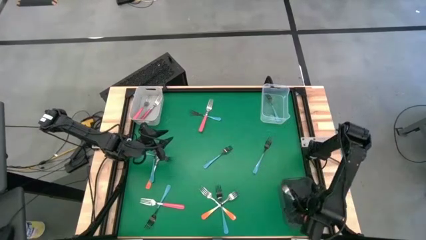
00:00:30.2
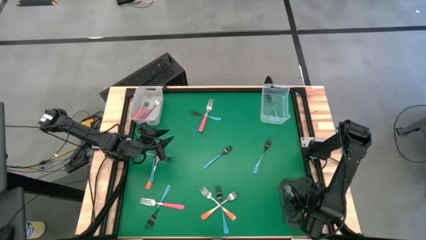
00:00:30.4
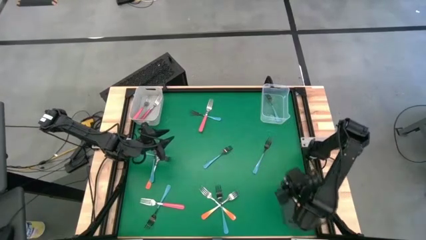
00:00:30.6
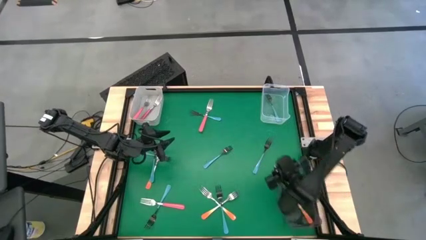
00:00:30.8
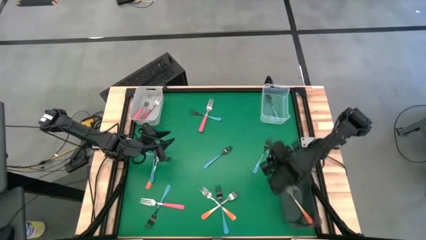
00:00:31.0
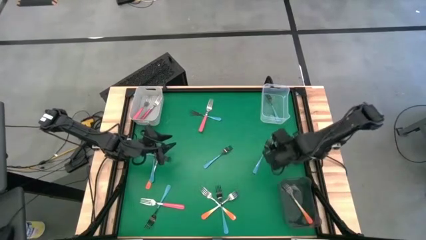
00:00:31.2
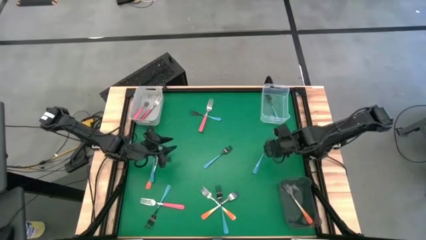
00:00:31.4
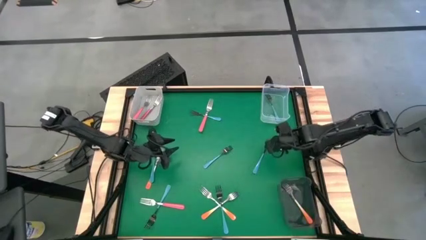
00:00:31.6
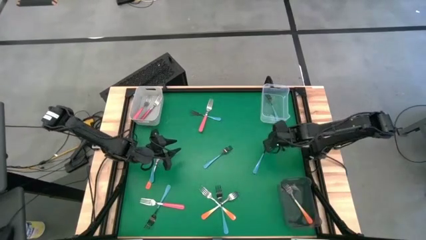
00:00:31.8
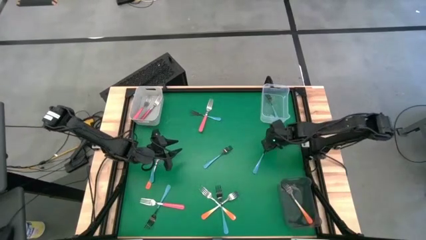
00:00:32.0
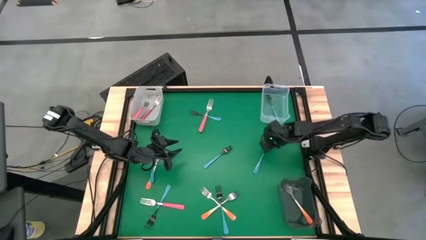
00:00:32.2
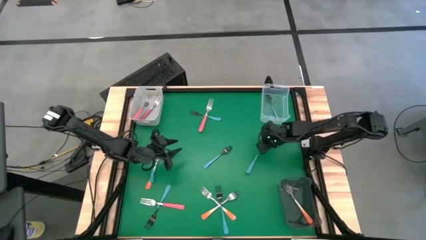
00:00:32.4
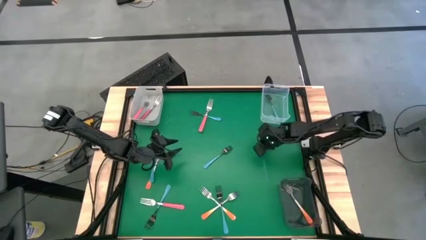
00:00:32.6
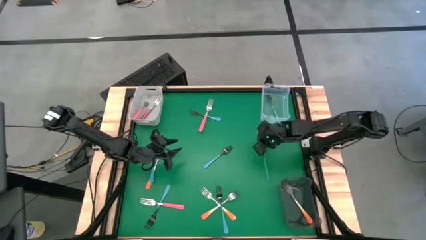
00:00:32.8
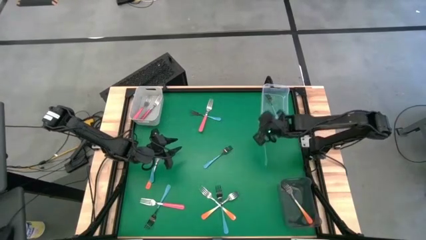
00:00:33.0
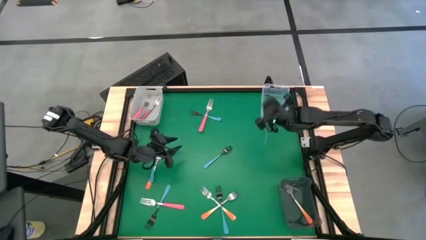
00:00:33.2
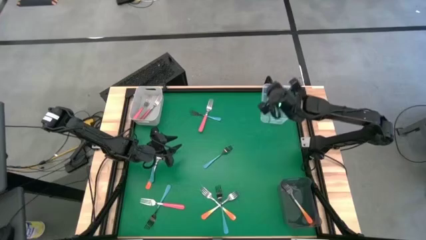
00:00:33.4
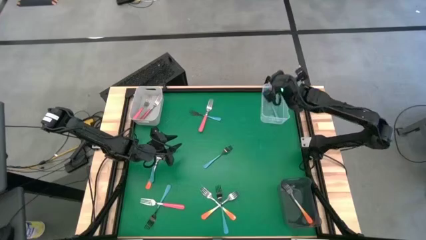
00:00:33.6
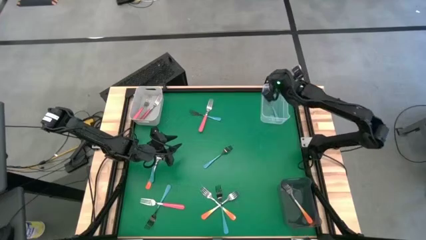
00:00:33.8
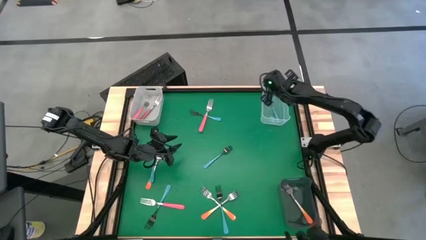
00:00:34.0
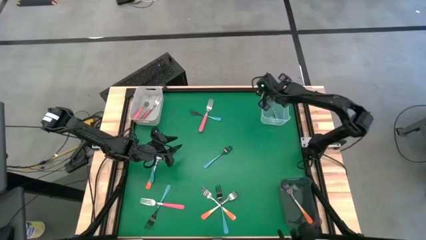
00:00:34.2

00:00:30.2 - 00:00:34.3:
Task: Sort silverware by color (type)
Put the blue fork into the transparent bin

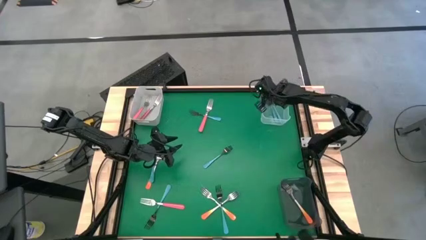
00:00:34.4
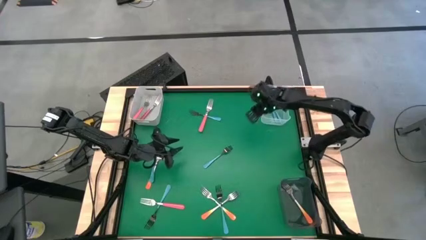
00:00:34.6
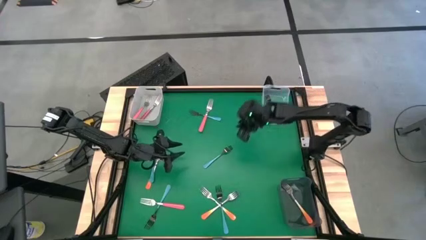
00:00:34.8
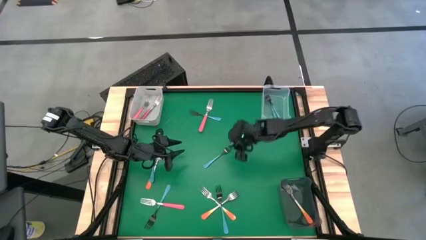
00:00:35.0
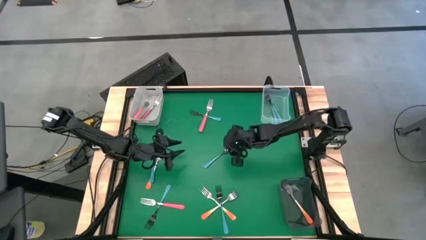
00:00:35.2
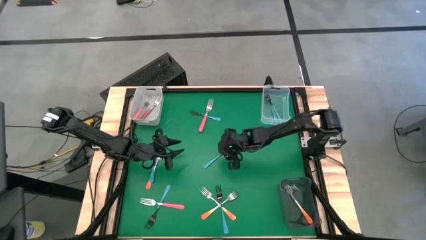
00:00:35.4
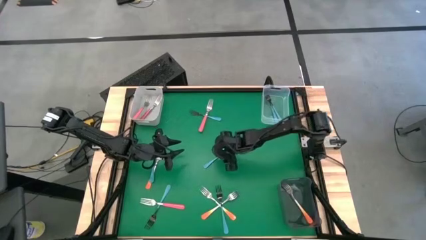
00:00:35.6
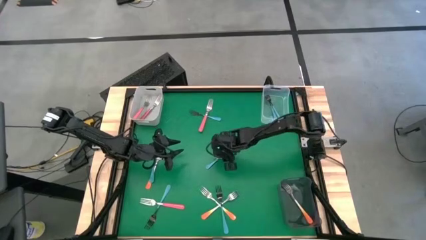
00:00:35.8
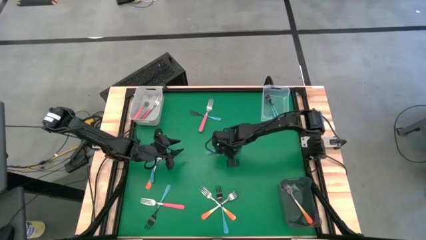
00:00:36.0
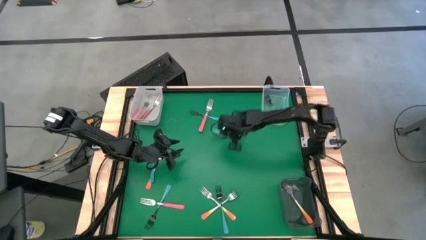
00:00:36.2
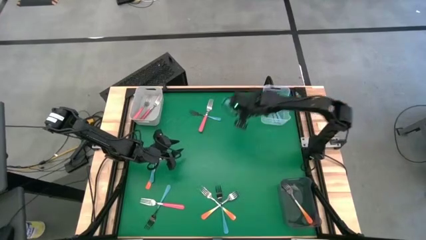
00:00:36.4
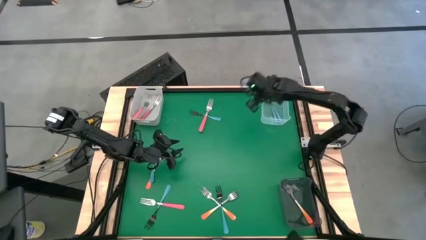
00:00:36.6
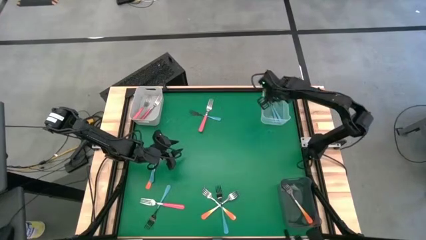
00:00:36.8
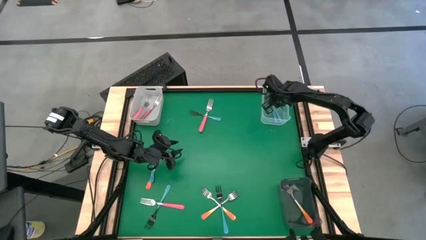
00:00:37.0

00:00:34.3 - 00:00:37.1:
Put the blue fork into the transparent bin

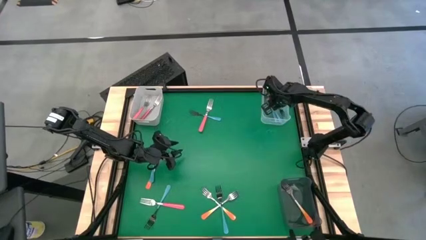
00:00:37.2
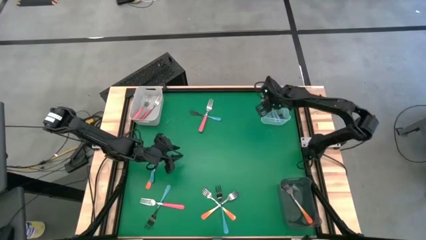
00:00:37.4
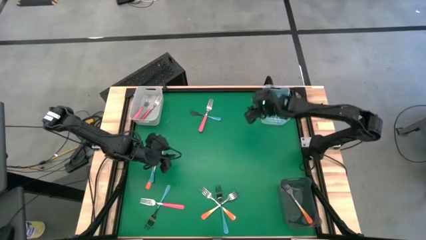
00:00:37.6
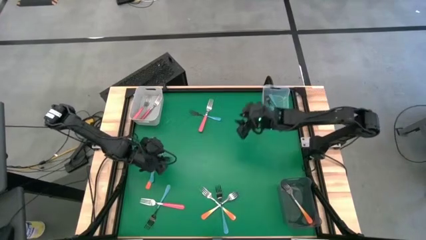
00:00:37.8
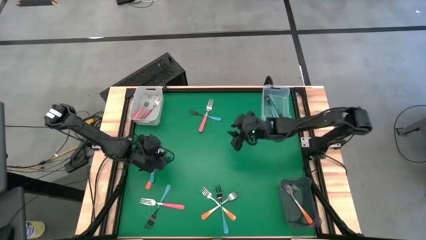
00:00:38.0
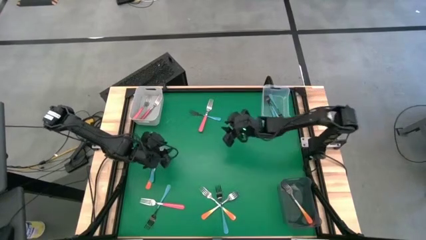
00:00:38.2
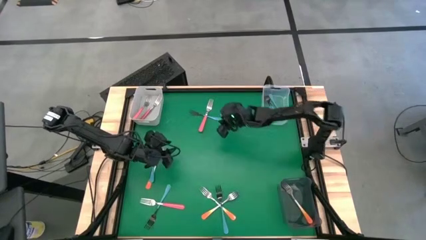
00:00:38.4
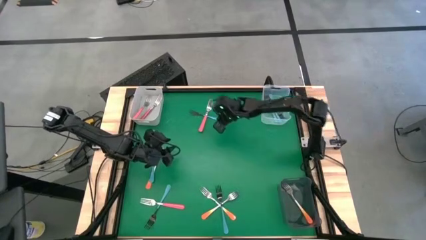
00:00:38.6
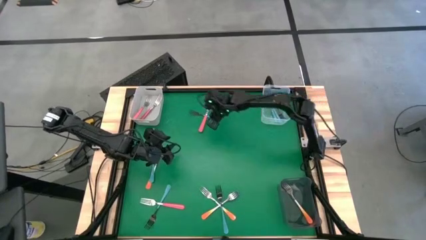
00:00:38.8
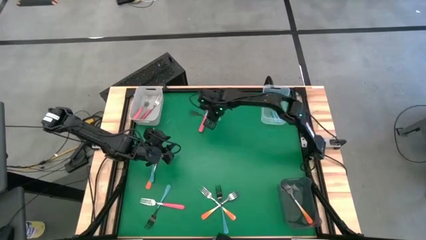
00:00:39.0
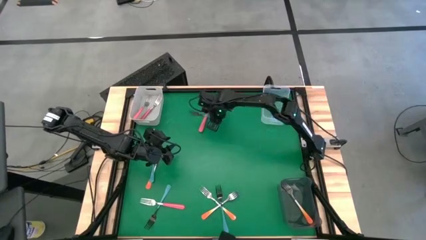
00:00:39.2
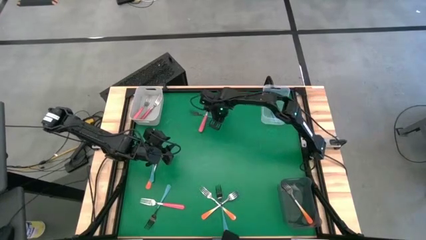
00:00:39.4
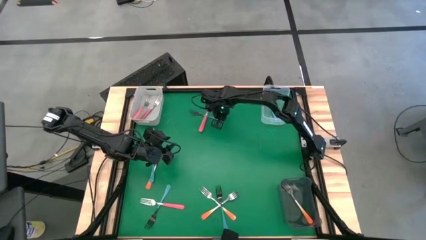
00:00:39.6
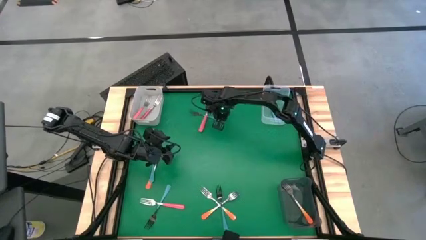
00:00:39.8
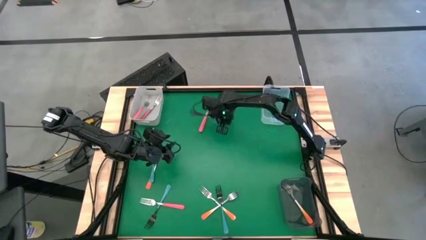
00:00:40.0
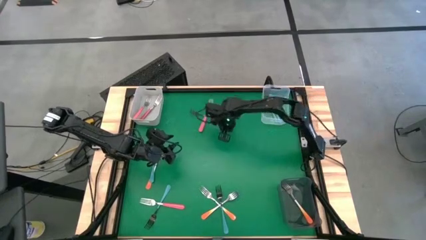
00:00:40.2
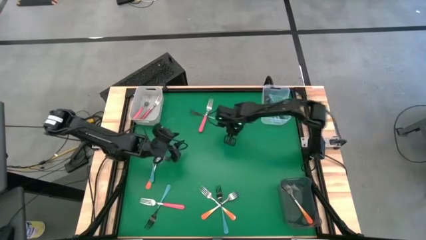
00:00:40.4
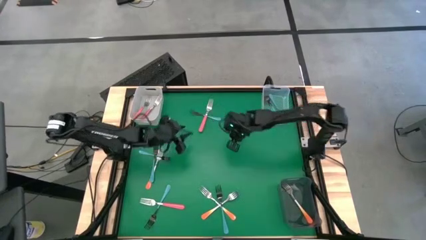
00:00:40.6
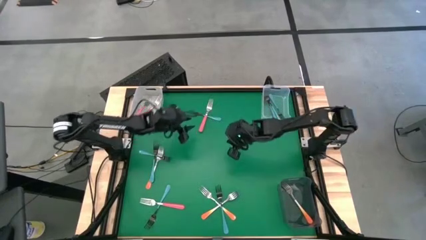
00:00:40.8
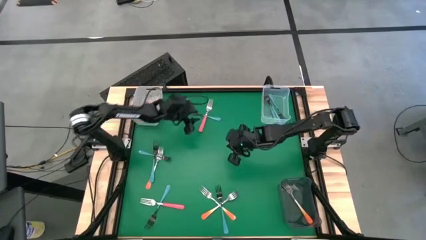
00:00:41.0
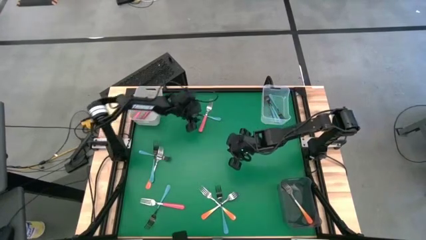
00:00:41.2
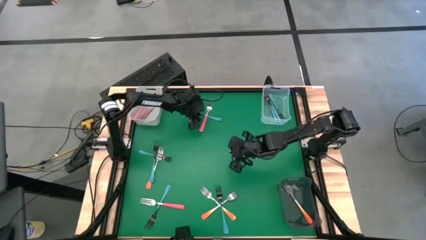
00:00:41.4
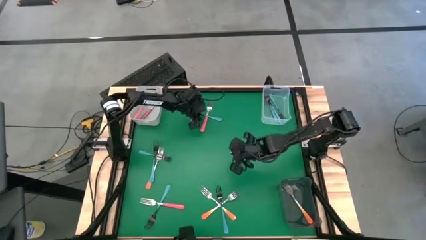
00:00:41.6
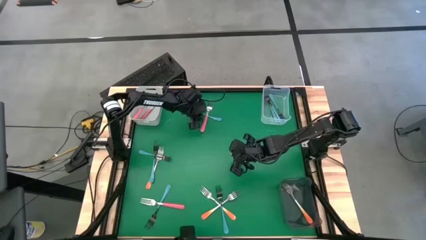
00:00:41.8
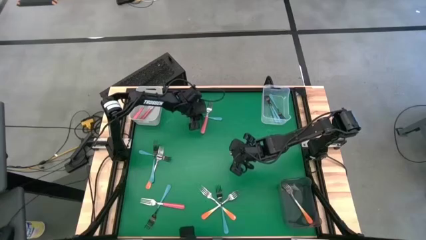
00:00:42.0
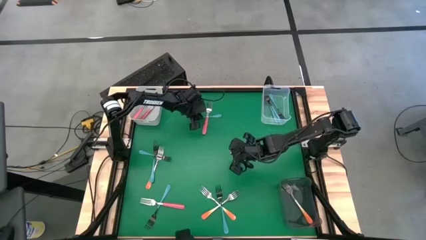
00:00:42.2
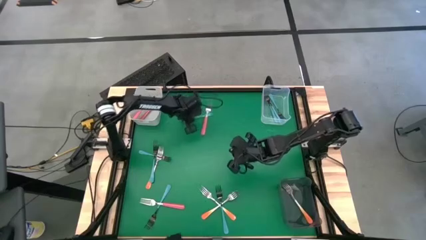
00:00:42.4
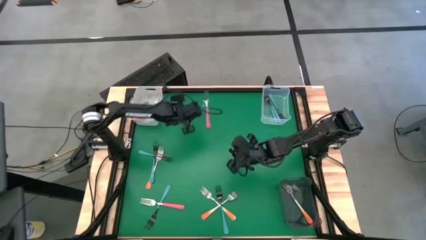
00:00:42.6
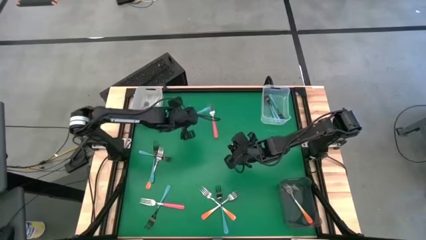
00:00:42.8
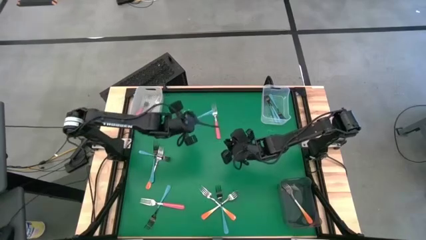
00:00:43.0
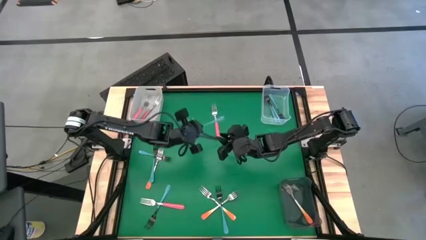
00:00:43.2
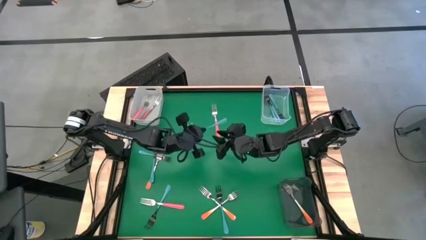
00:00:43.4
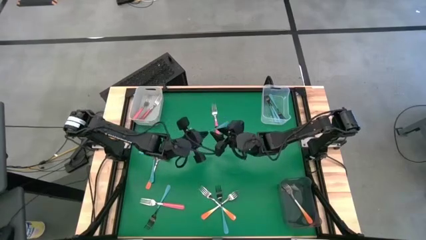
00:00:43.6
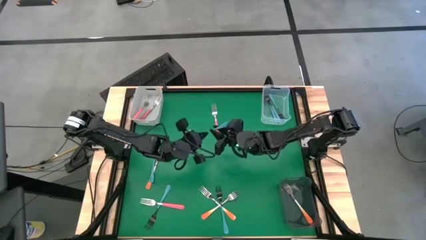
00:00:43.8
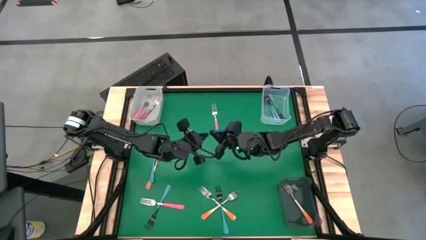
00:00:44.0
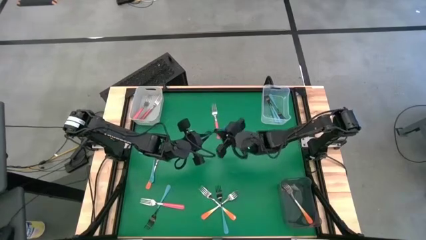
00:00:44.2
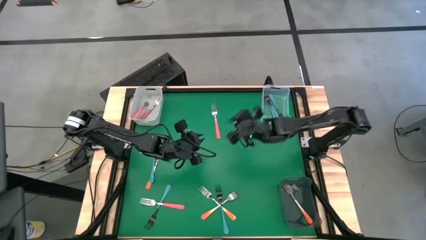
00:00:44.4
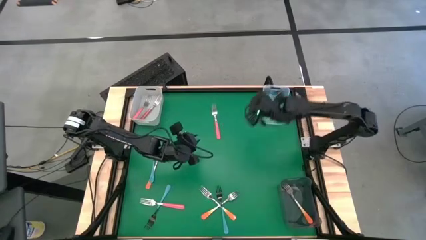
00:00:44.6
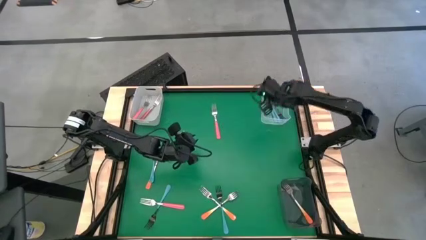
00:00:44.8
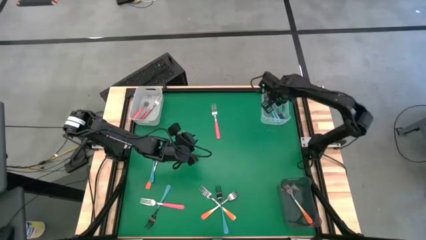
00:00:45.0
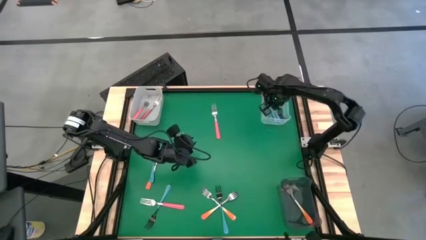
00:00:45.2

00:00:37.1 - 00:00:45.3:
Put the blue fork into the transparent bin

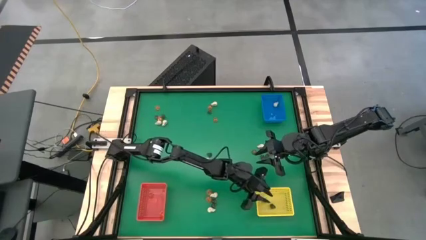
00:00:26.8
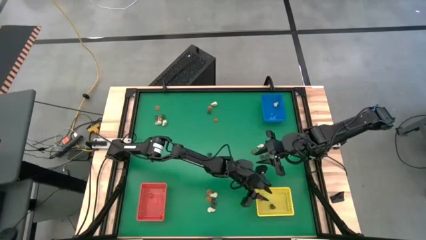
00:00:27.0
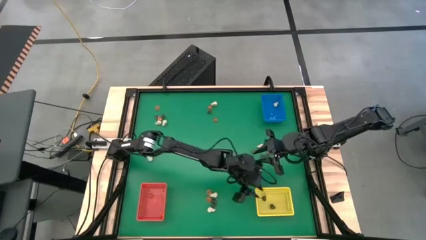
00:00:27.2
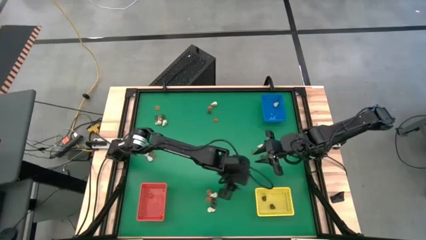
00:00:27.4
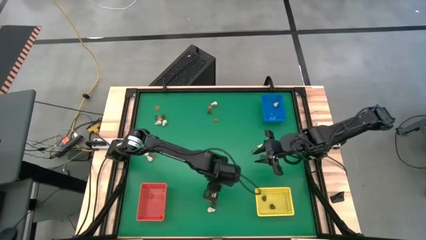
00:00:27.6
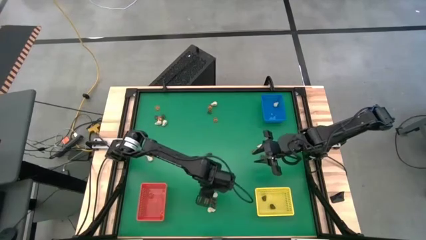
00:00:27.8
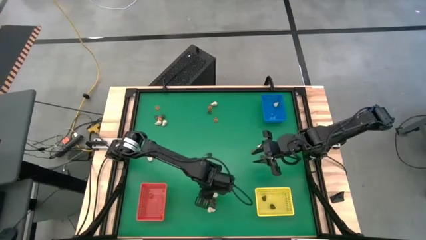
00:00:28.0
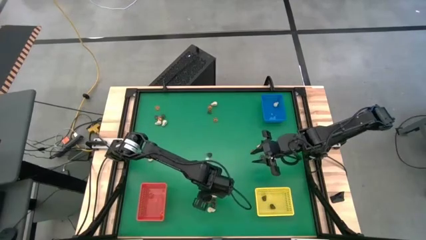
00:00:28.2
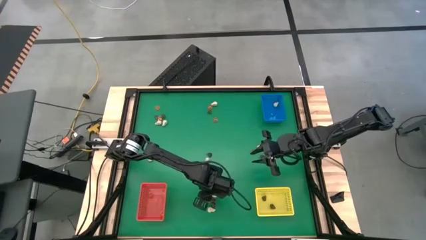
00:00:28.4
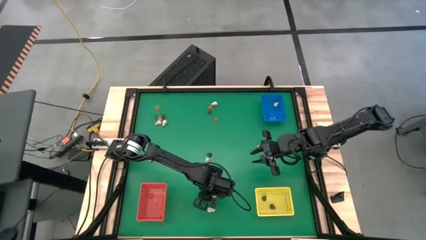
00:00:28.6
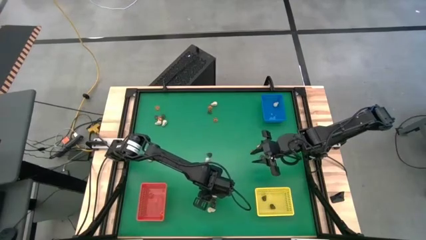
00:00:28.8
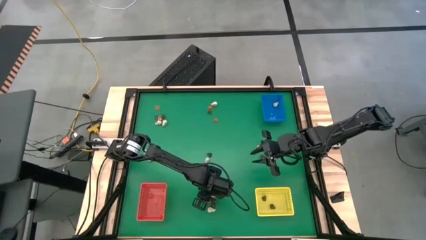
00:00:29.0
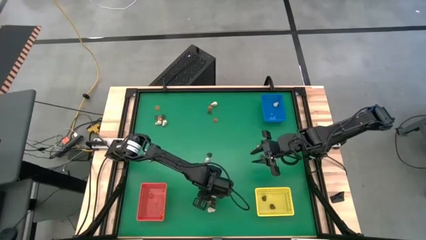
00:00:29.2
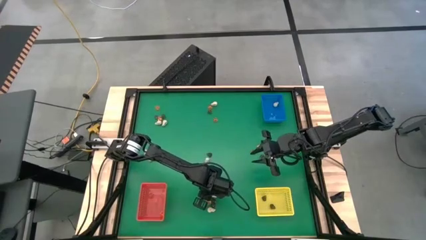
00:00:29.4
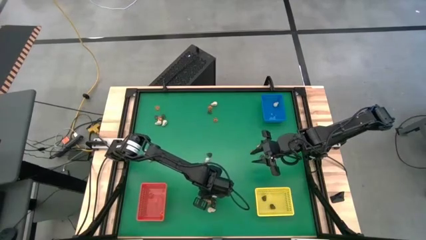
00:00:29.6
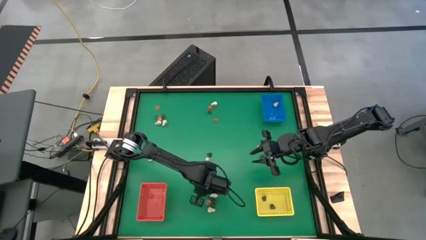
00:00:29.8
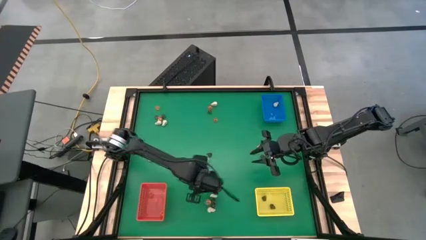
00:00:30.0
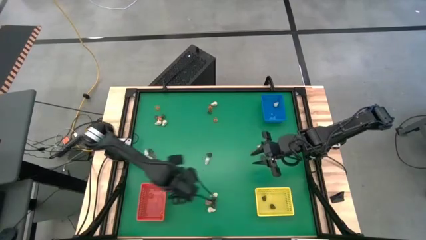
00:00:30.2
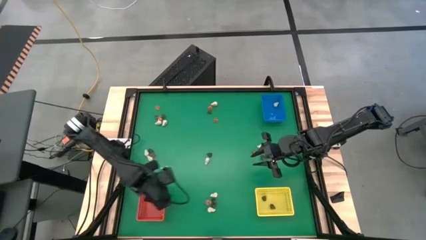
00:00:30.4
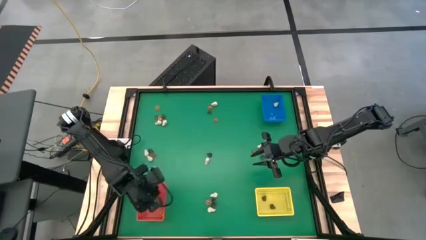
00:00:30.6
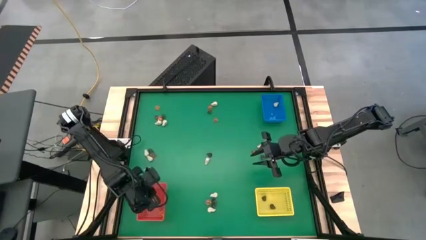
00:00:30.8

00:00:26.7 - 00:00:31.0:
Task: Sort Halloween decoration
Put the orange pumpkin toy into the red bin
